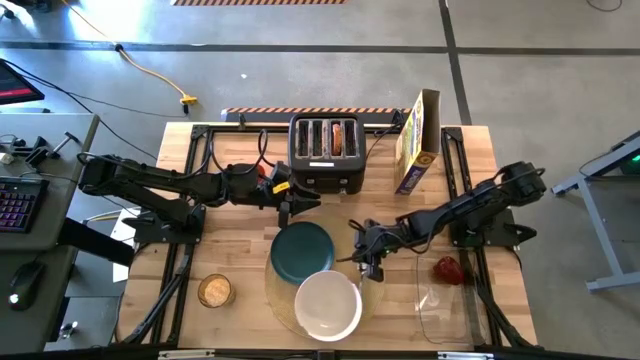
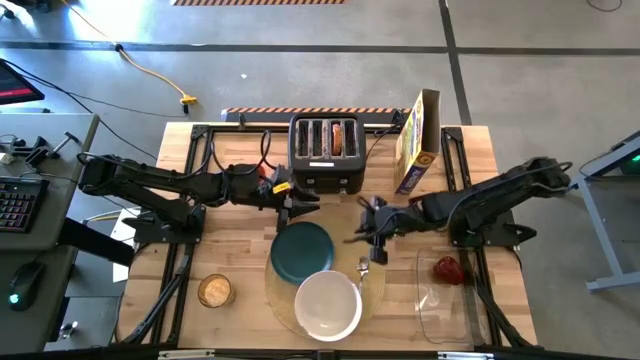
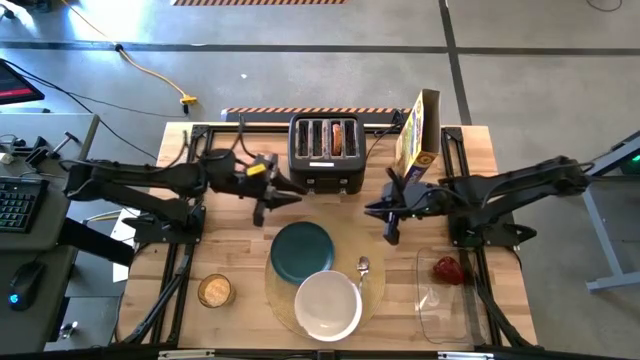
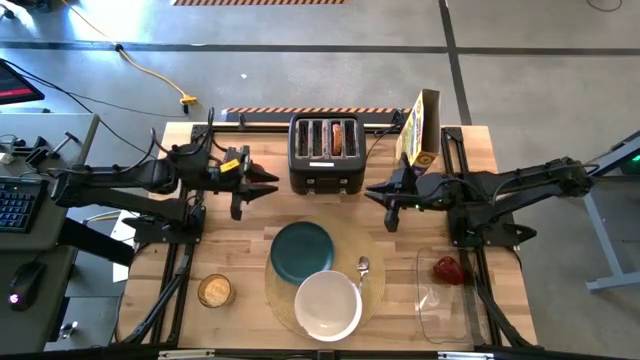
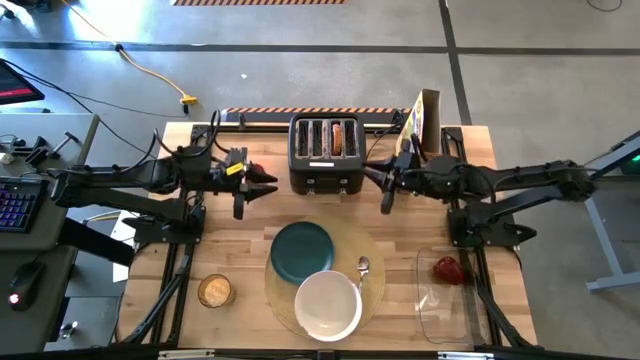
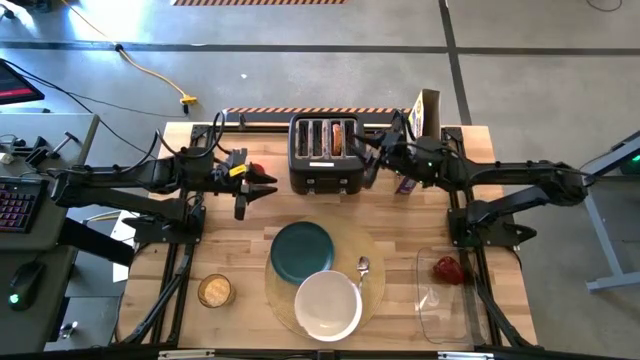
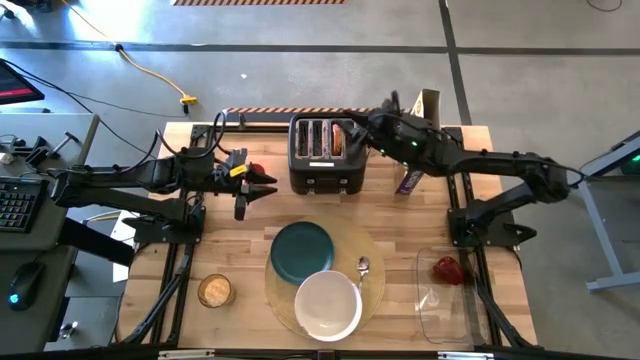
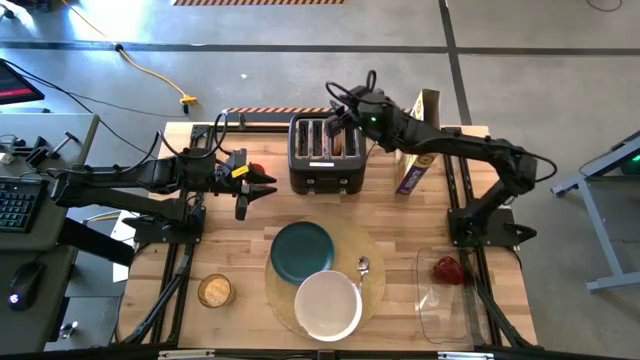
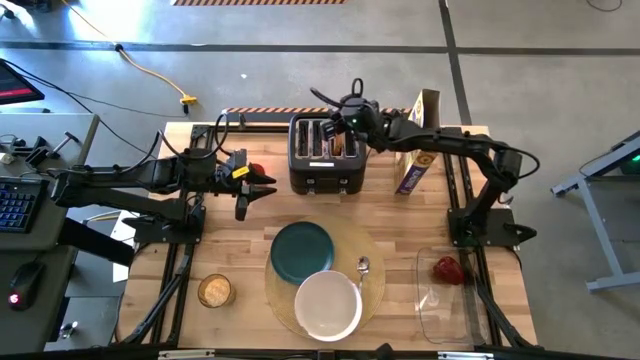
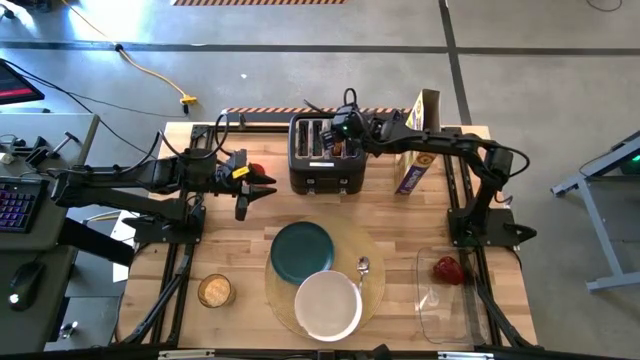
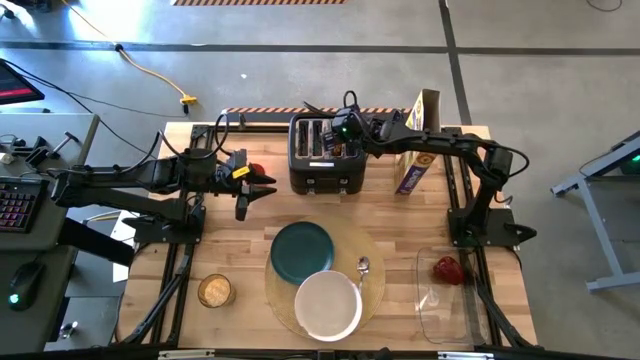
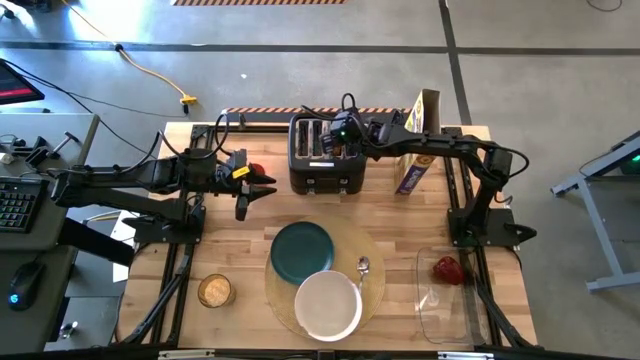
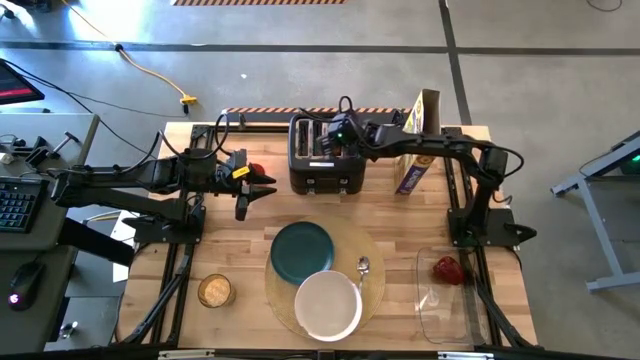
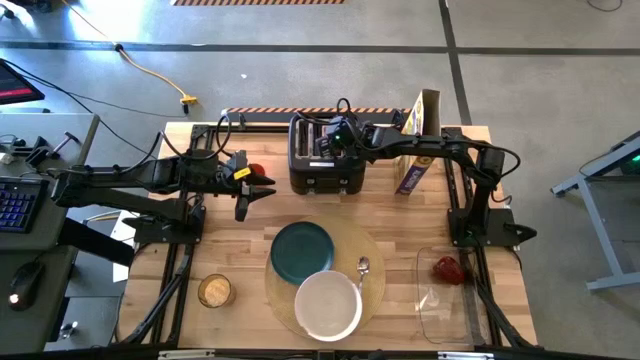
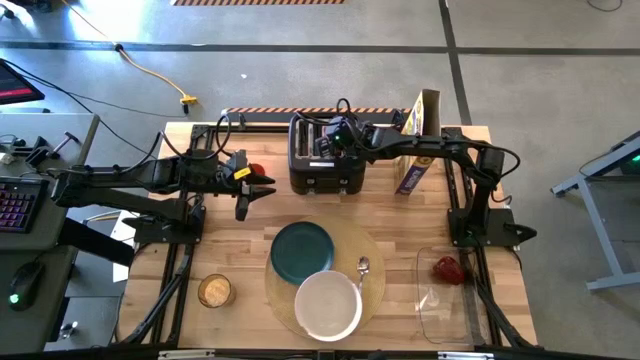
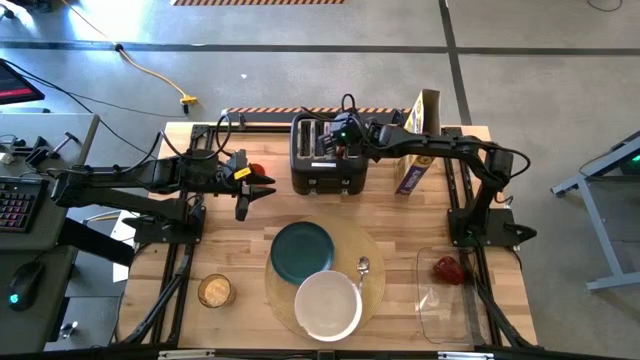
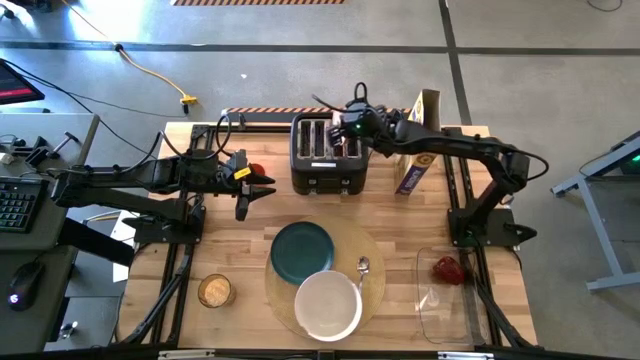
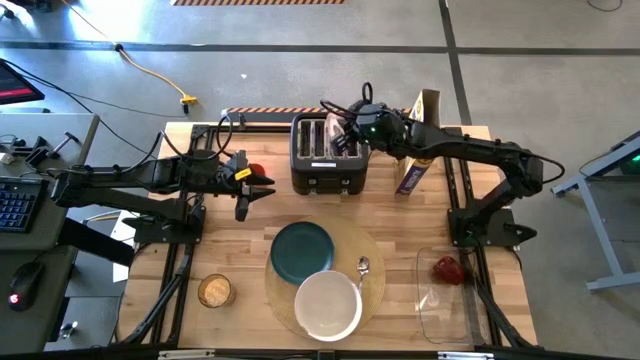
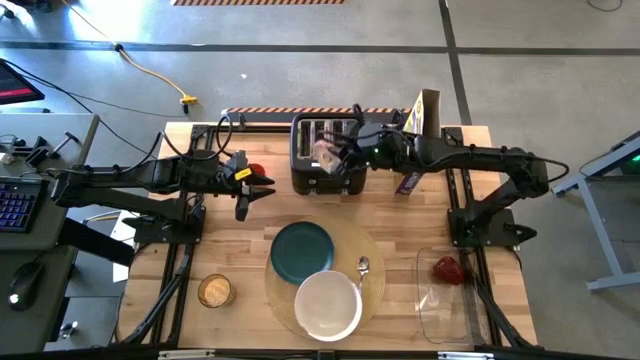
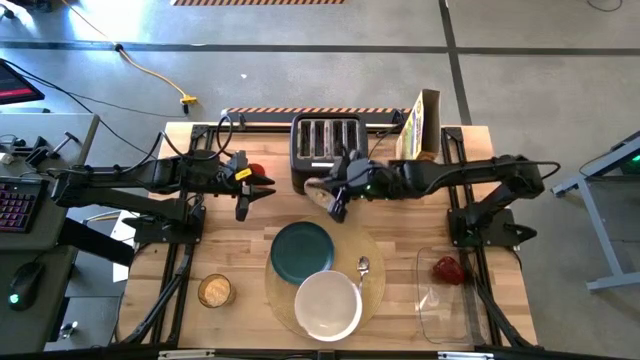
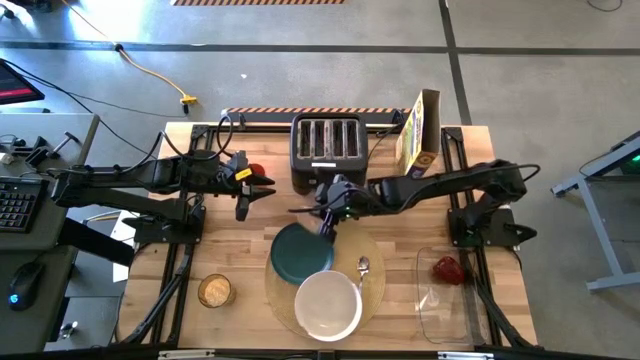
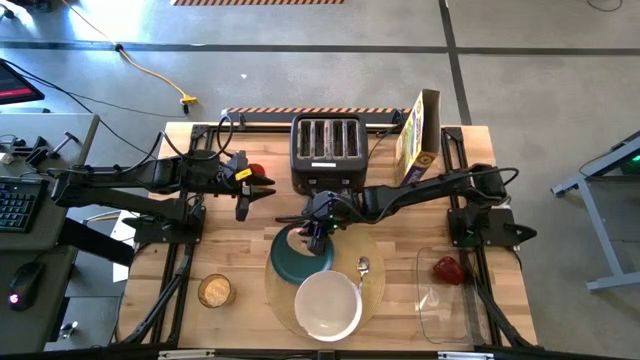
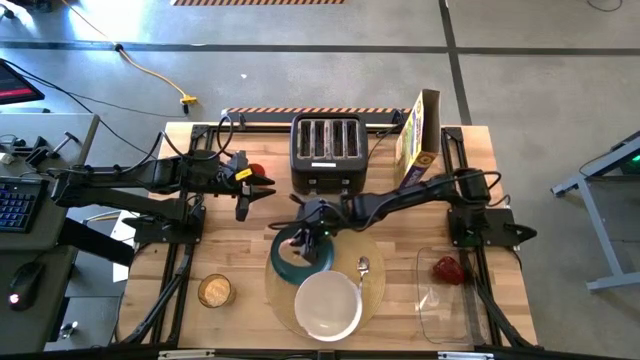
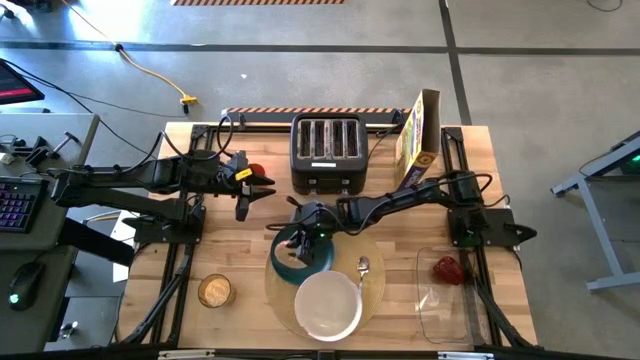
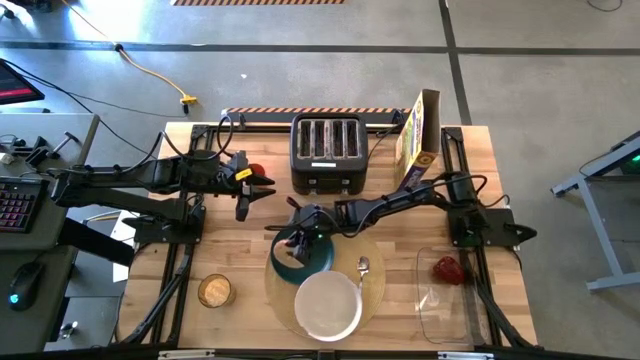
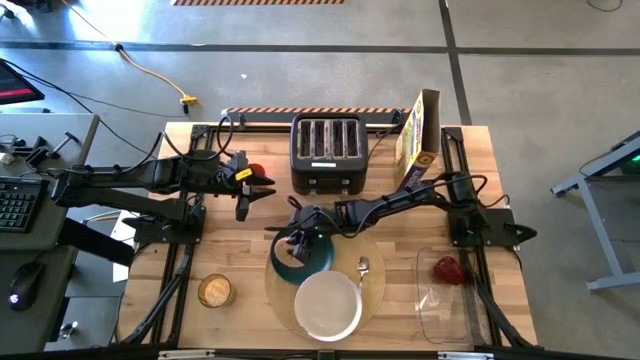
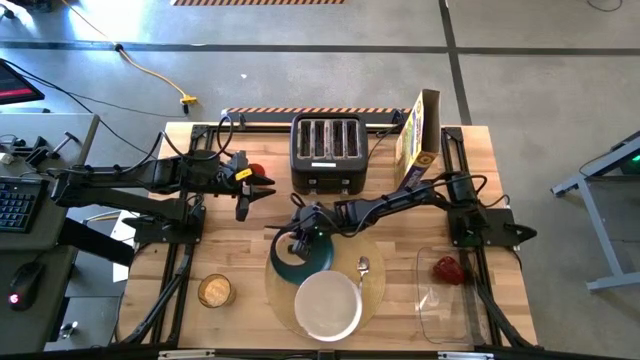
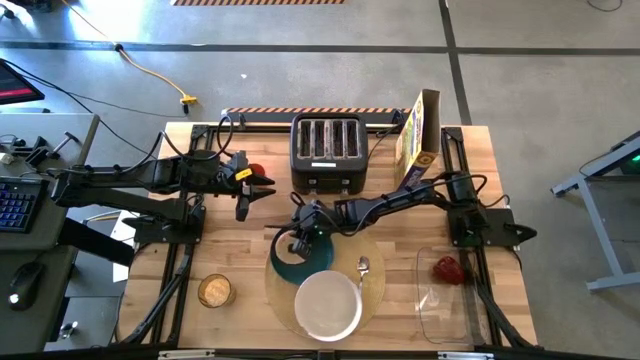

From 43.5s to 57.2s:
Task: Arrange a breakfast setting
Put the bagel on the green plate

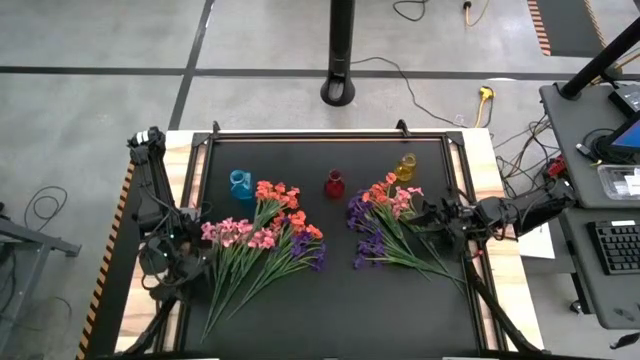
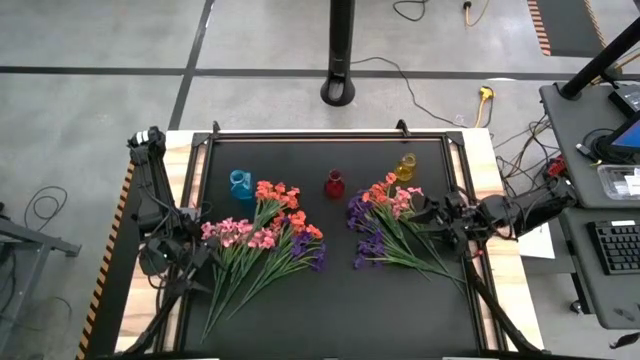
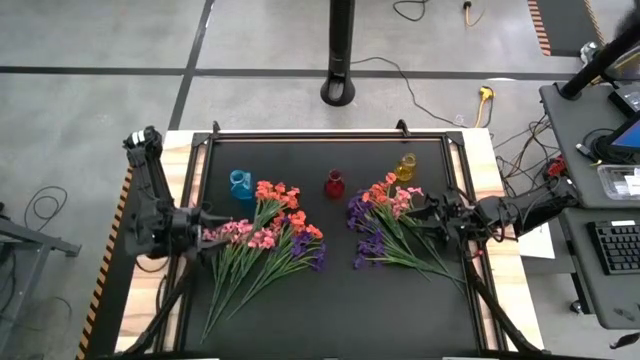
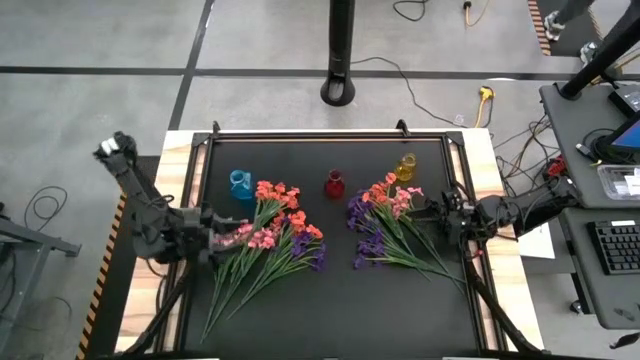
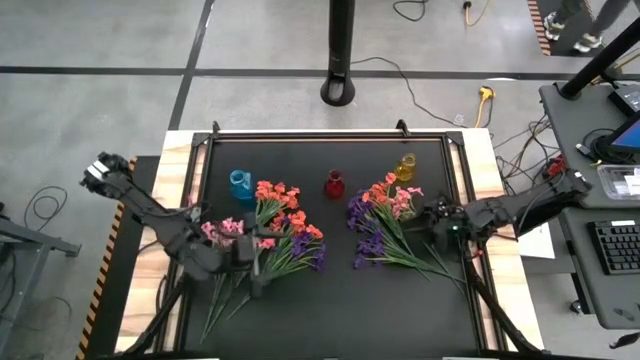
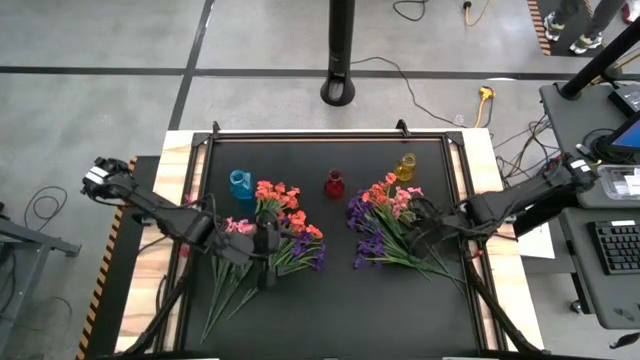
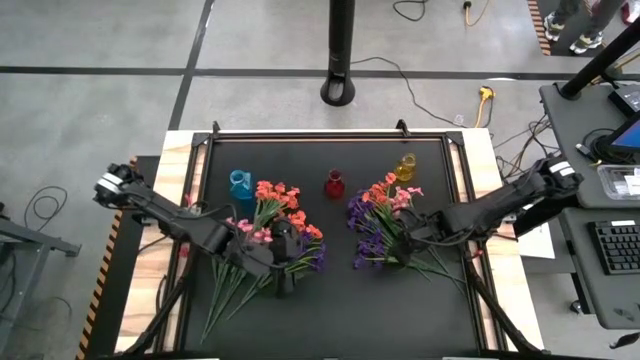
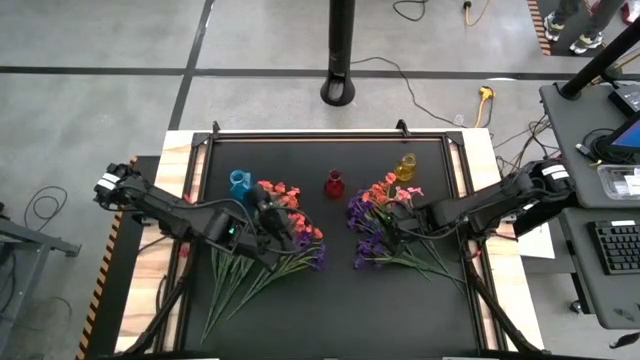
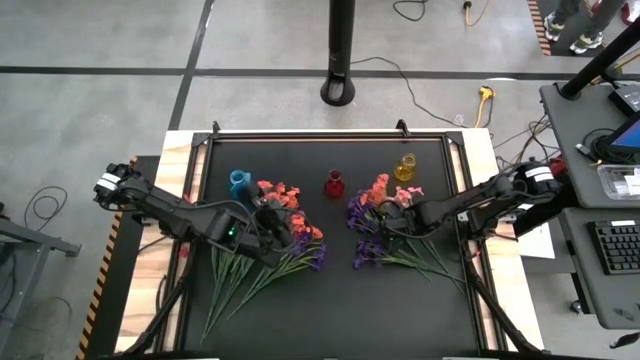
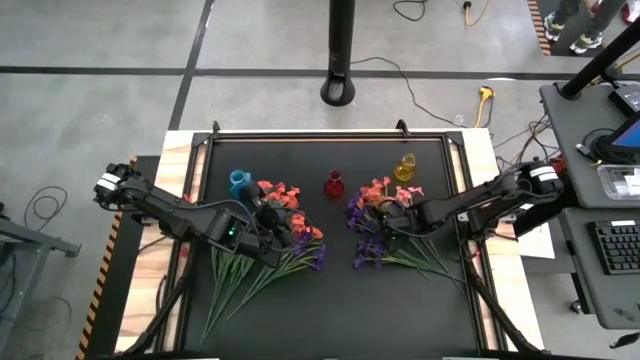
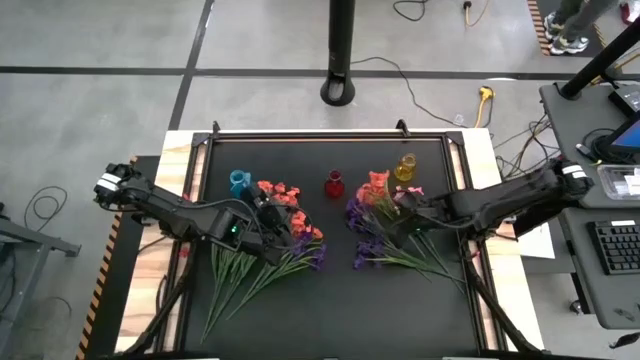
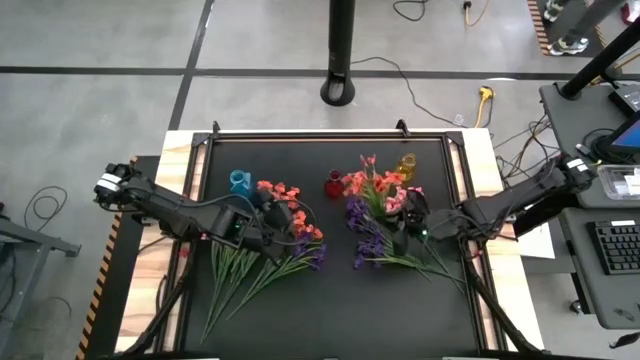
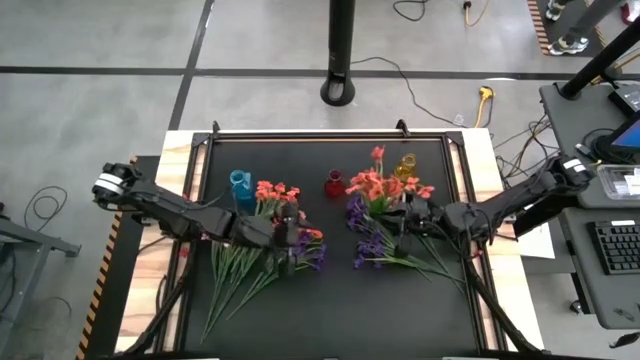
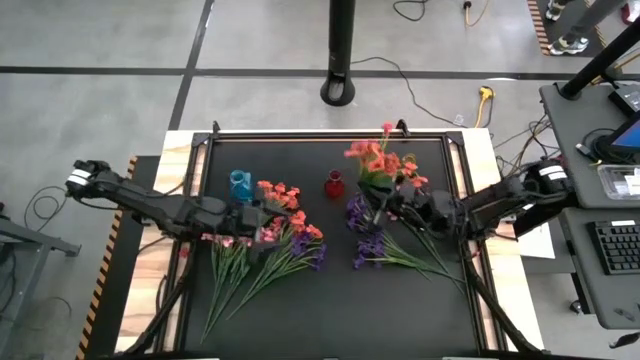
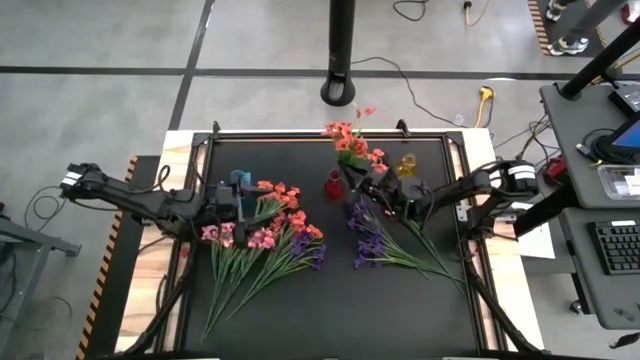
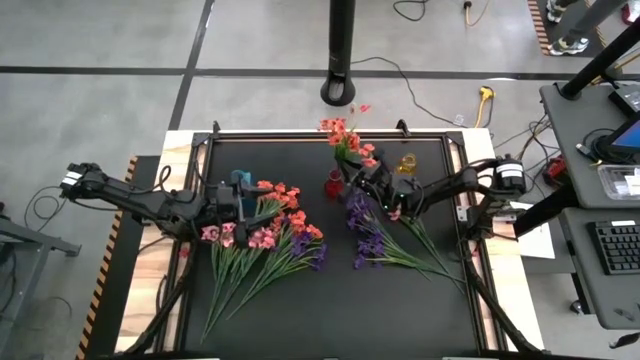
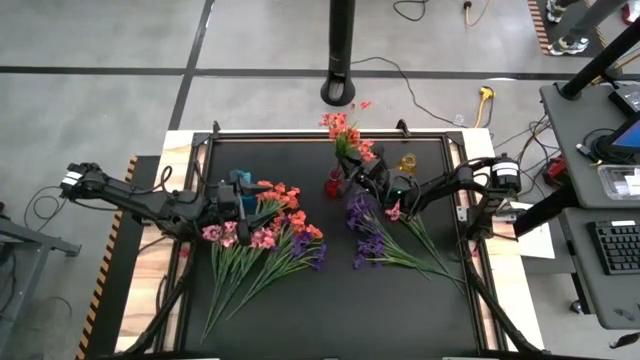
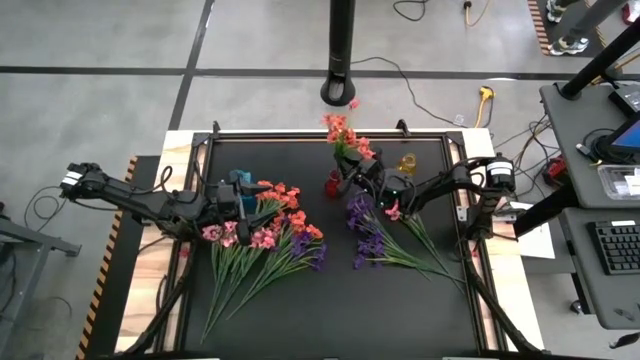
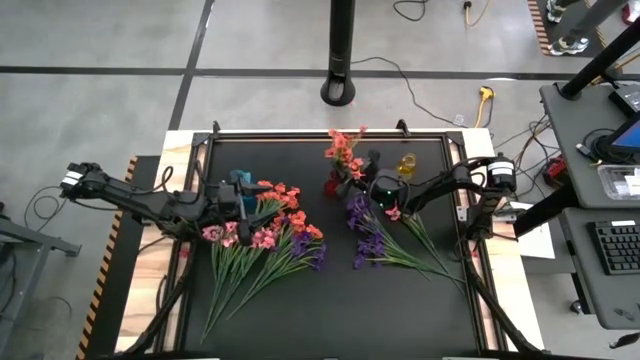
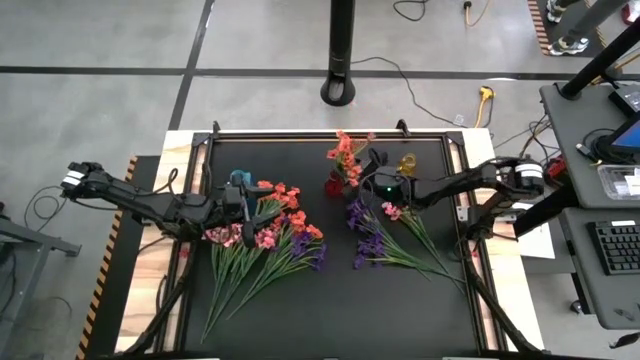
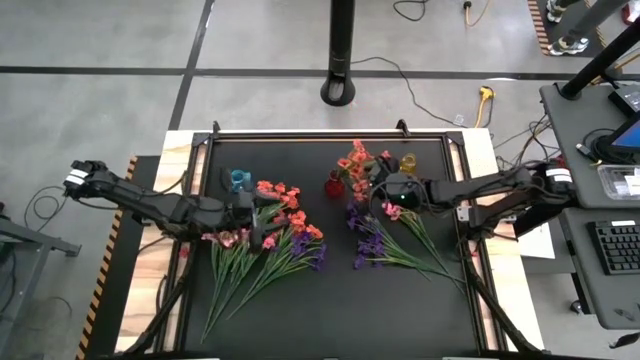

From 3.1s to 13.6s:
Task: Sort flowers into vase by color
Put the top right orange flowers into the red vase
